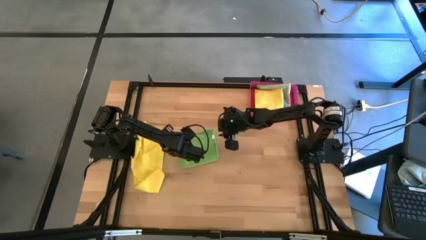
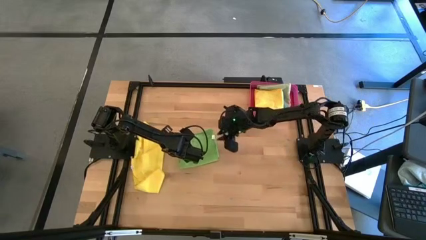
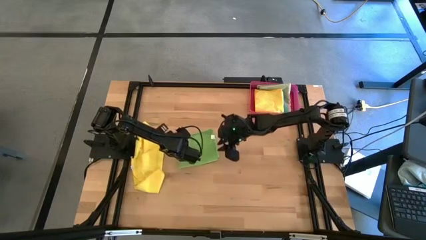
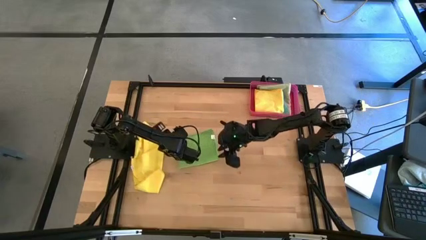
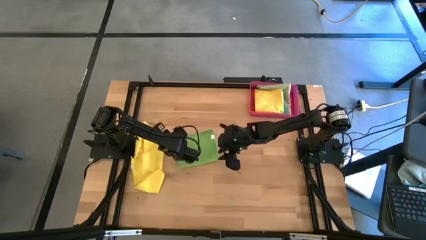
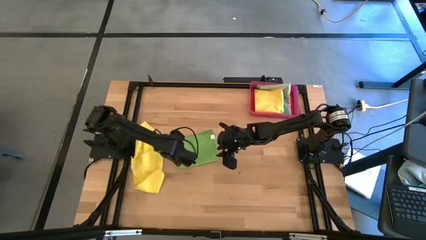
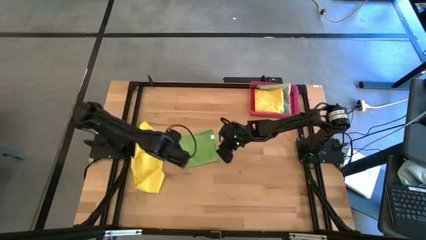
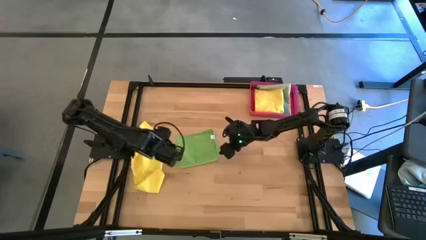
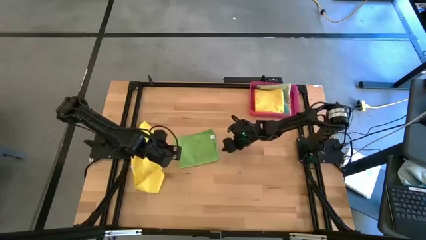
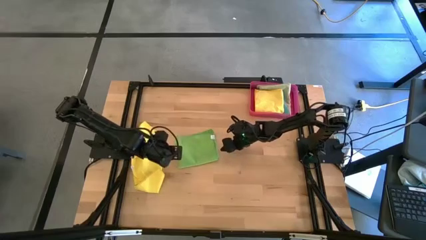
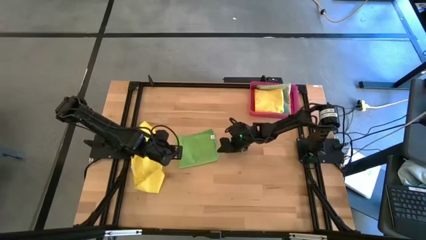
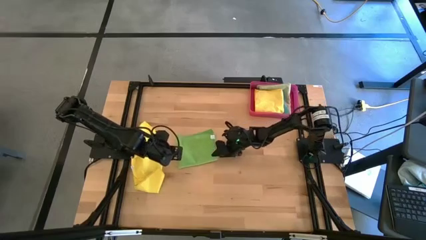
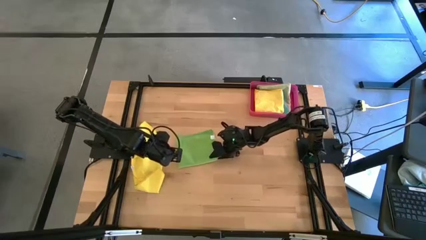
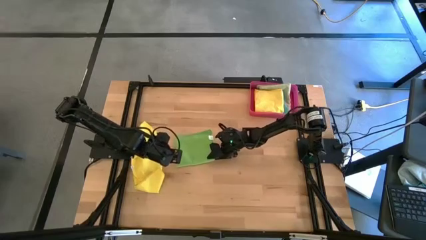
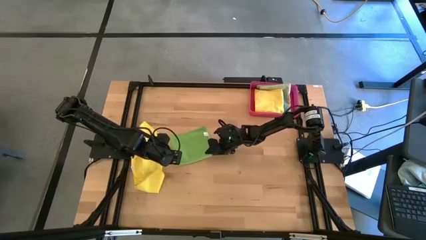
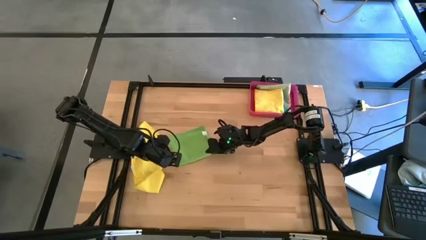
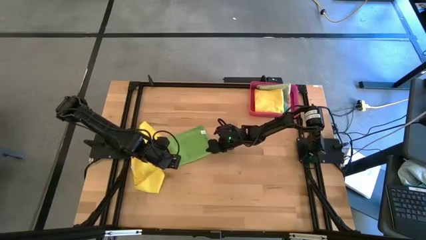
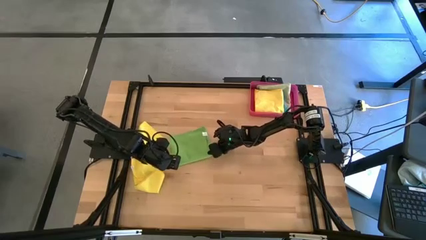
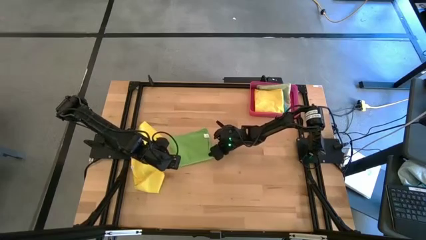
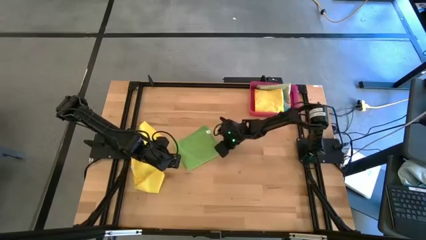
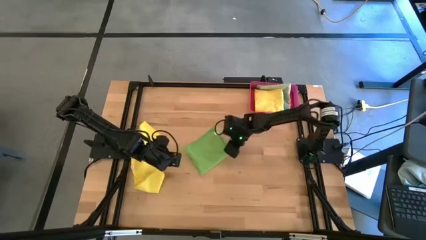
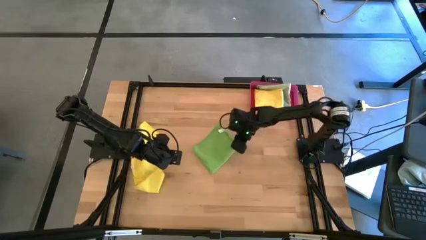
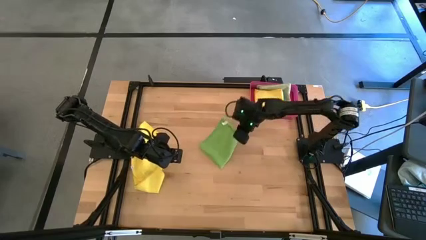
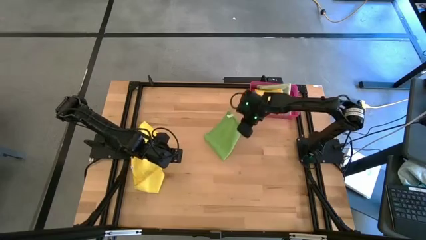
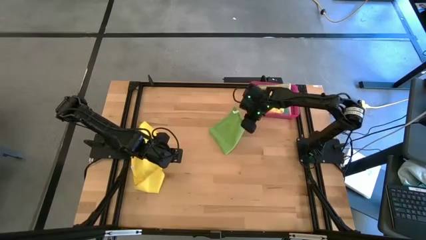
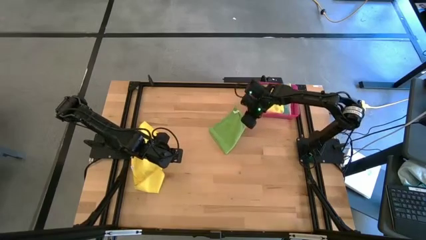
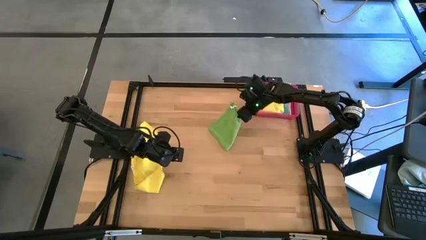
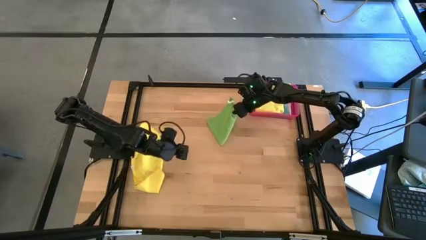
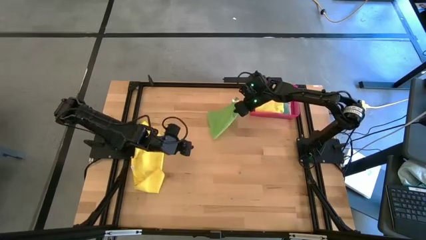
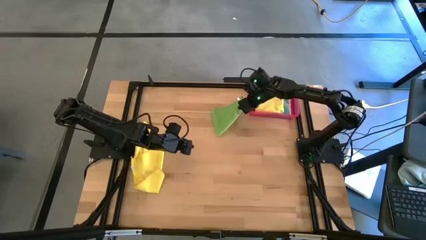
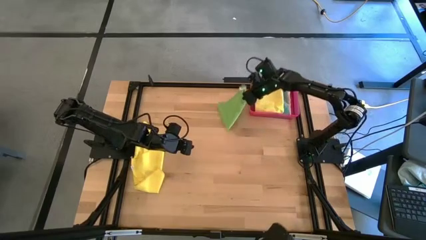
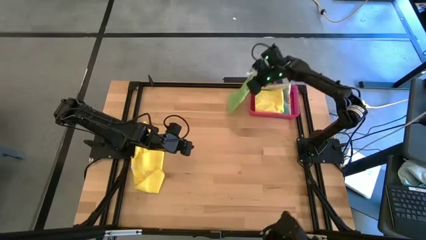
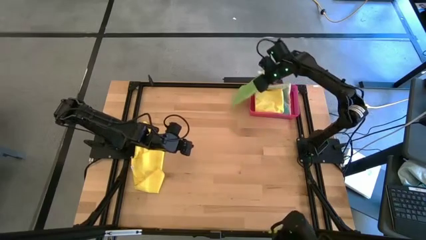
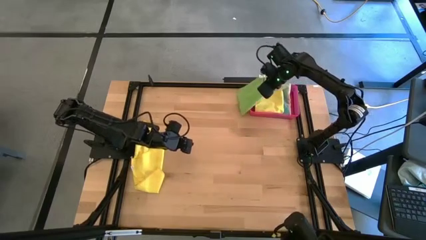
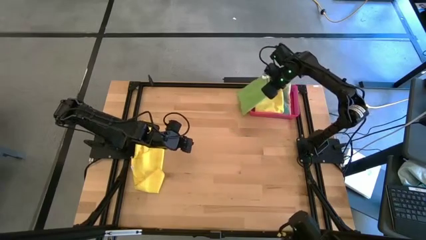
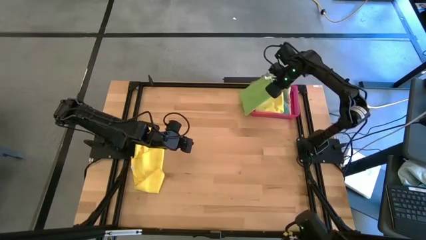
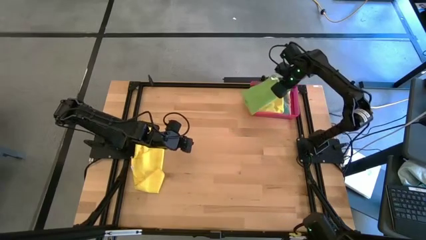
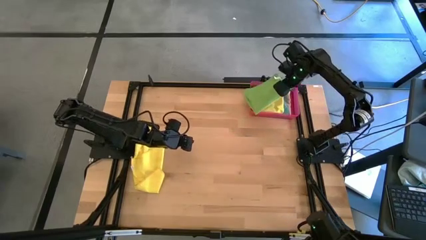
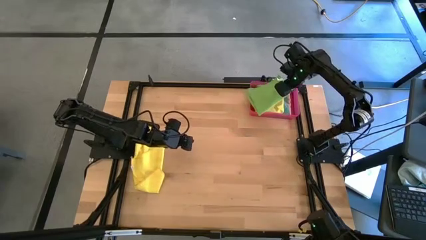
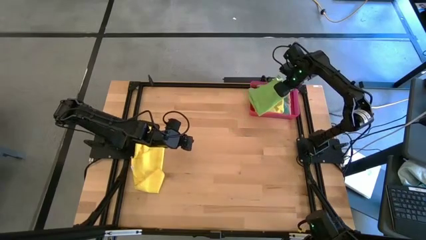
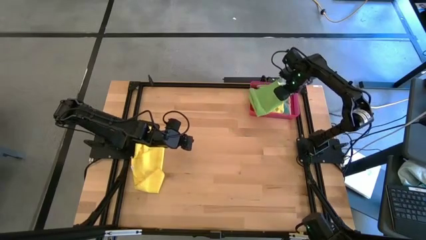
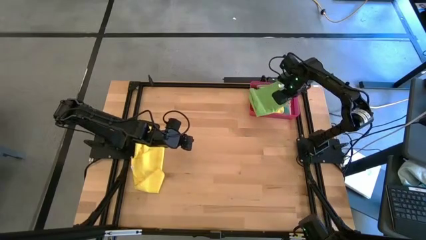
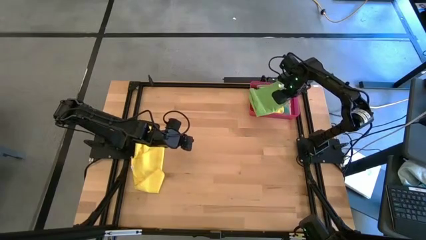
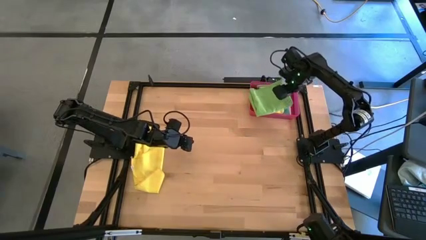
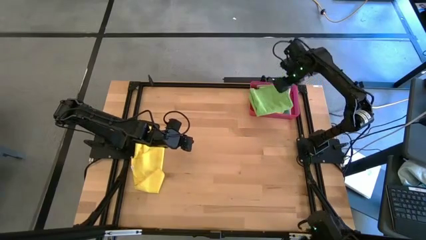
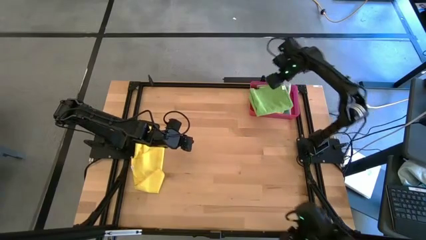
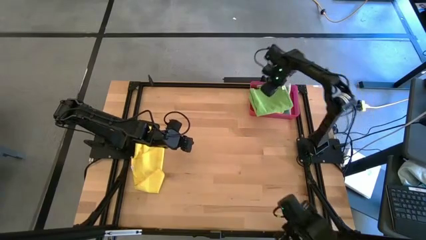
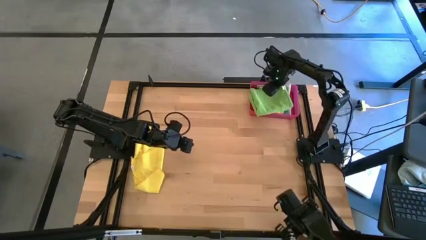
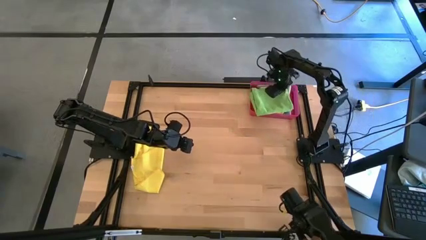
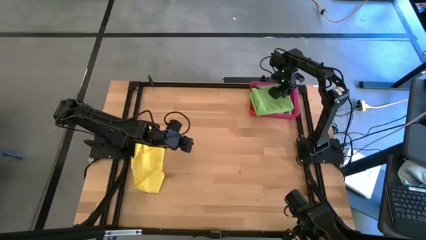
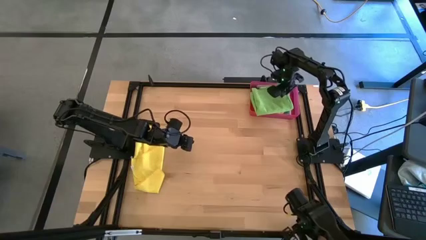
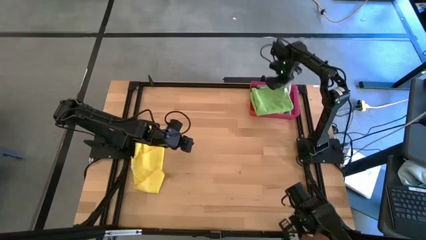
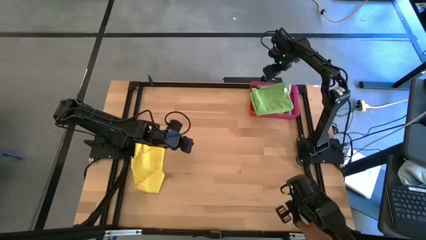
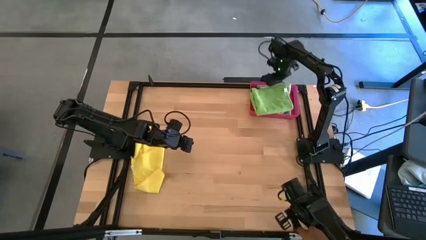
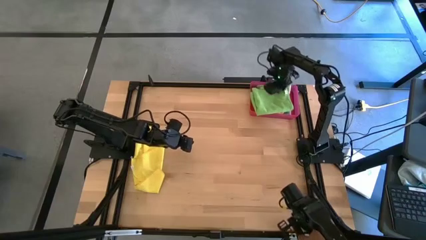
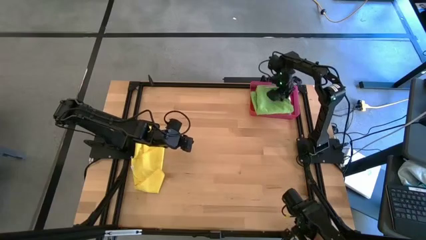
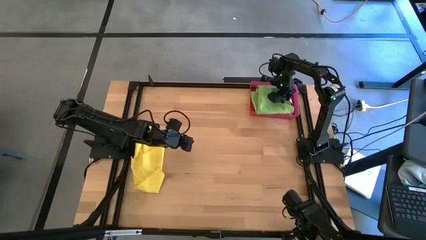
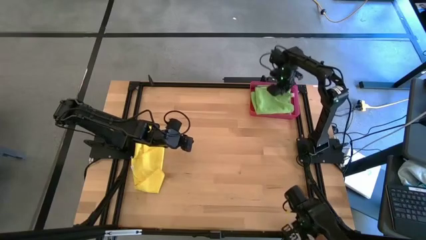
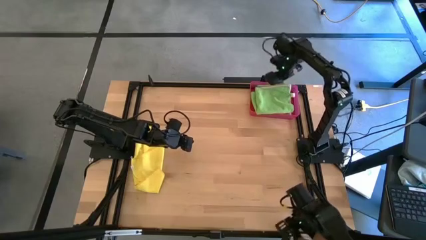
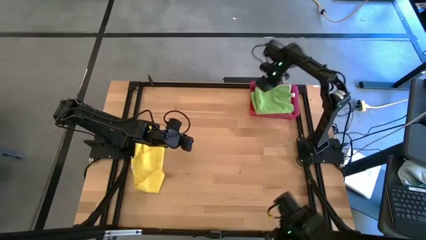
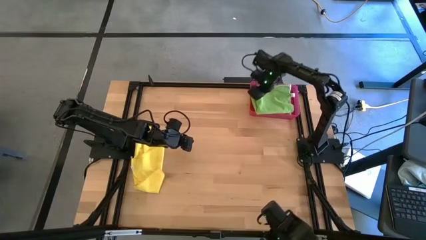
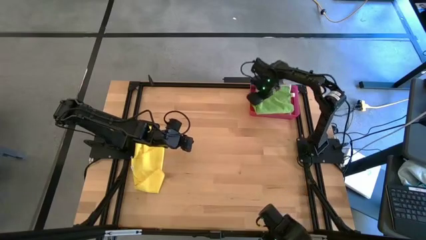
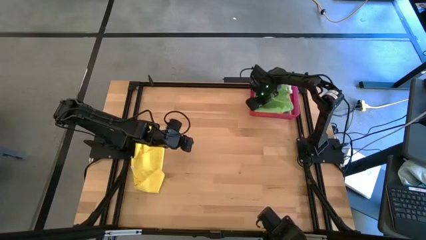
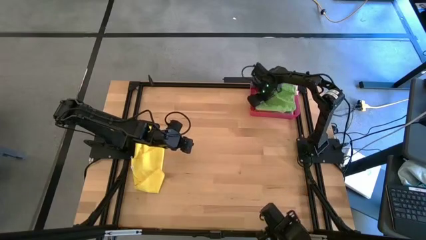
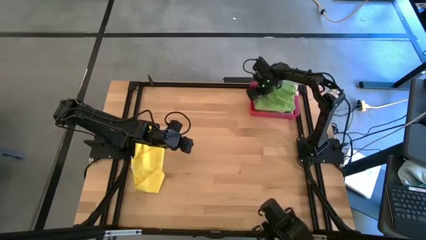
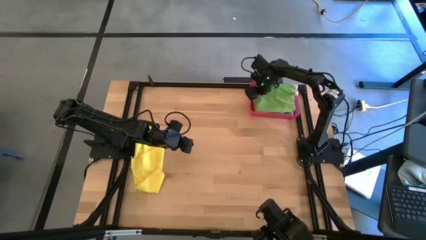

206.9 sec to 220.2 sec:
Task: Fold microfiber towels
Put the green towel into the red bin

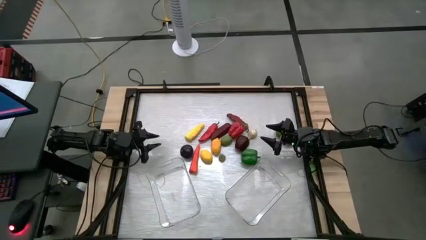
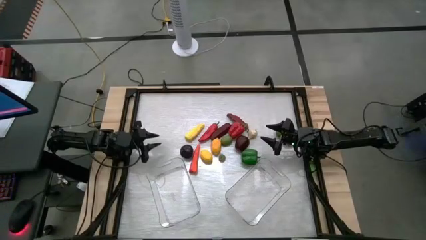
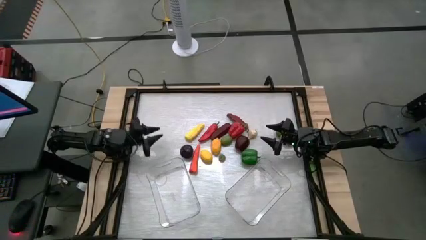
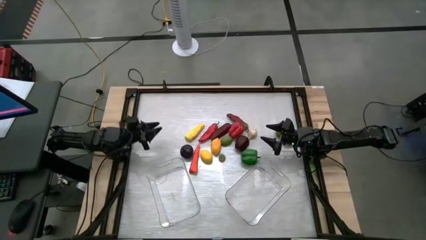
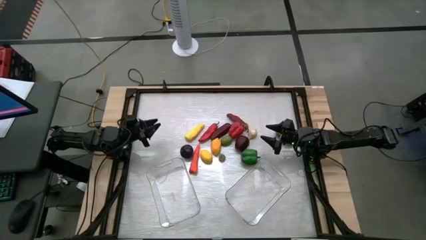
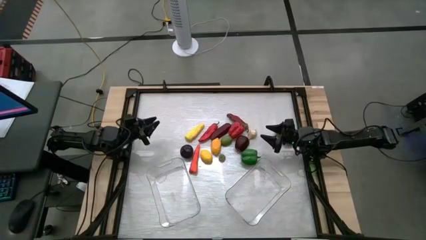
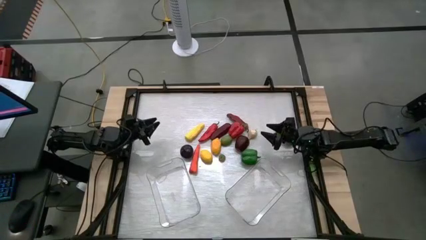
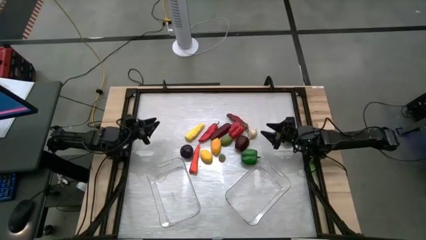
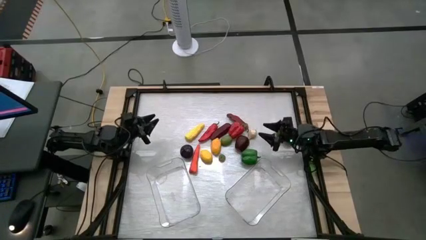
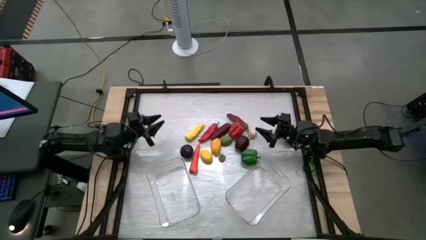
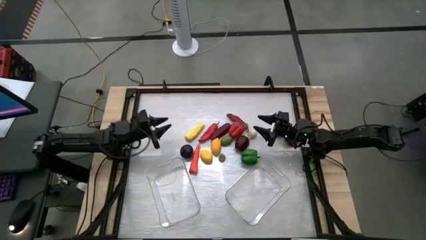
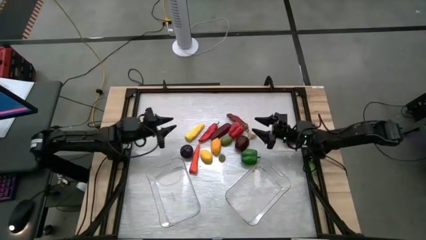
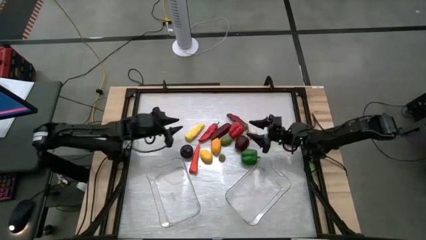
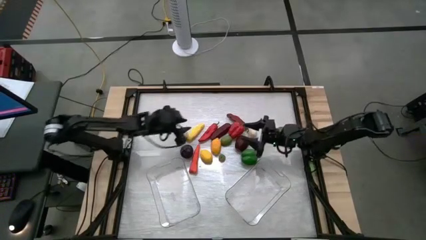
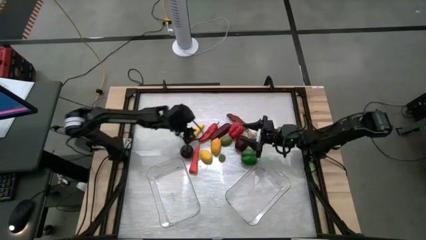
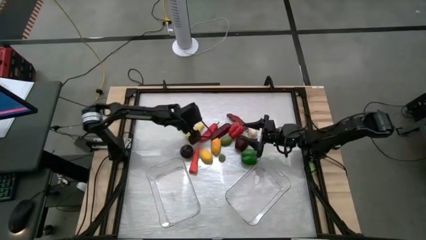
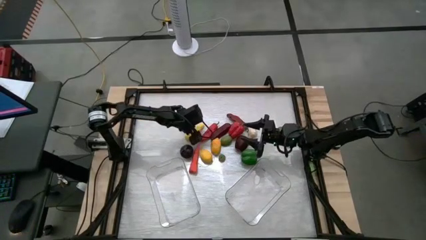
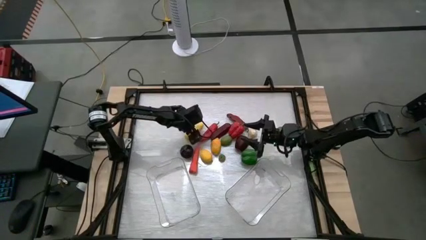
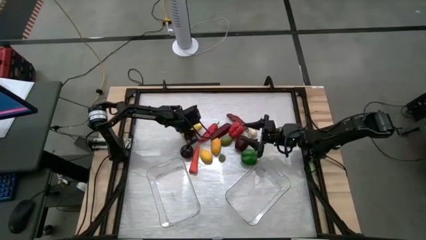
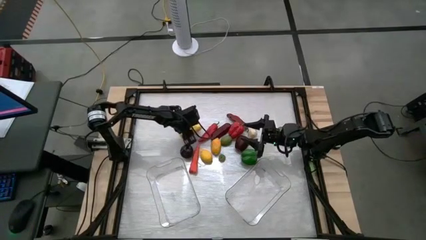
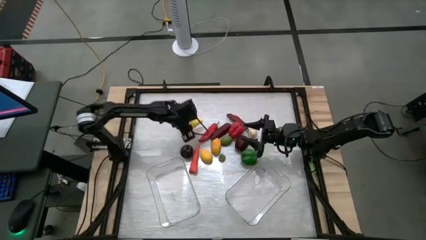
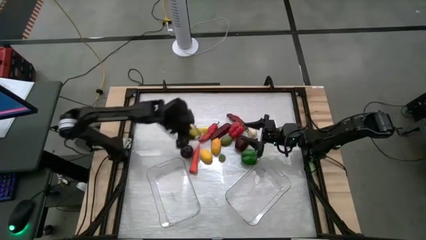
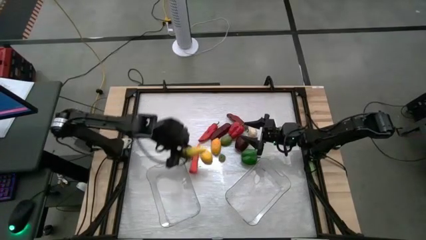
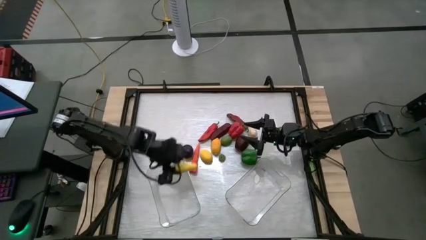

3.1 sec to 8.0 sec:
Task: Sort produce into baskets
Put the corn into the left transparent bin
